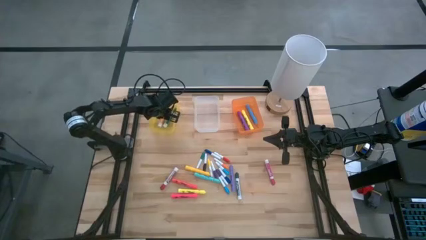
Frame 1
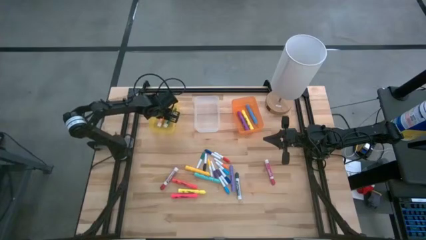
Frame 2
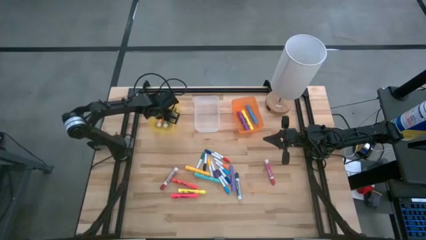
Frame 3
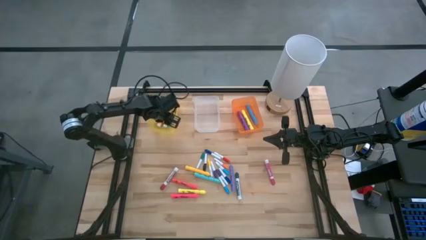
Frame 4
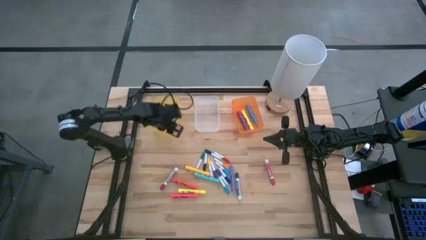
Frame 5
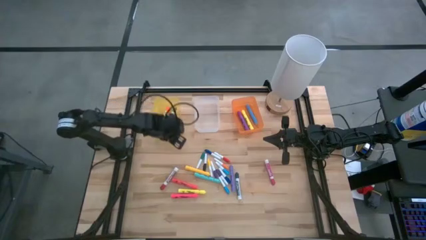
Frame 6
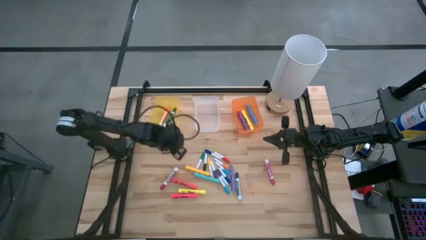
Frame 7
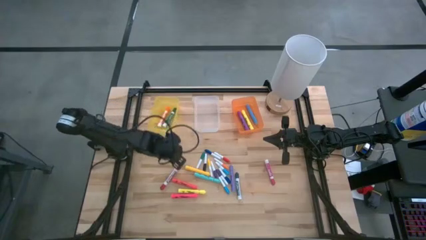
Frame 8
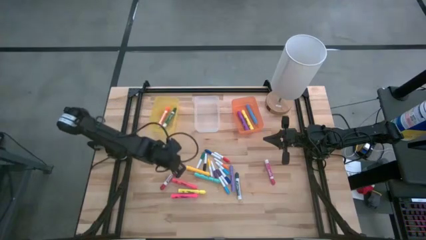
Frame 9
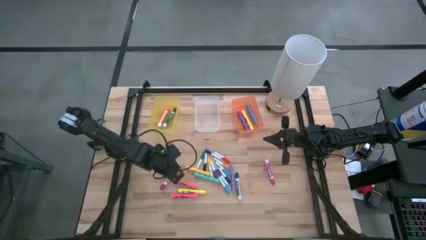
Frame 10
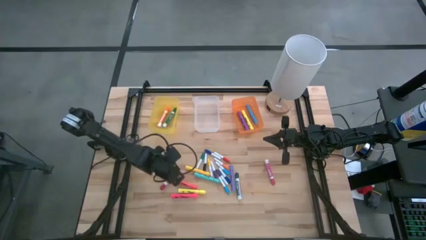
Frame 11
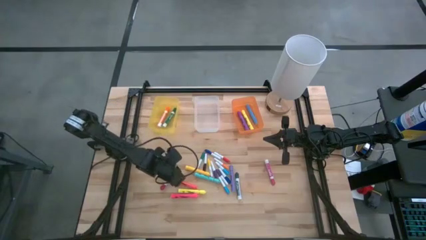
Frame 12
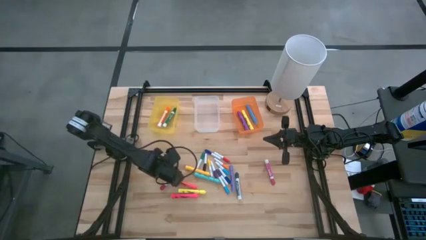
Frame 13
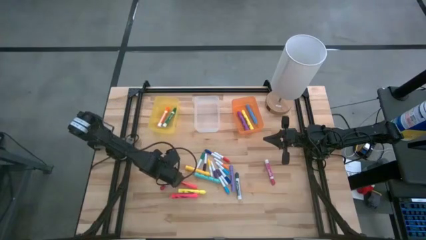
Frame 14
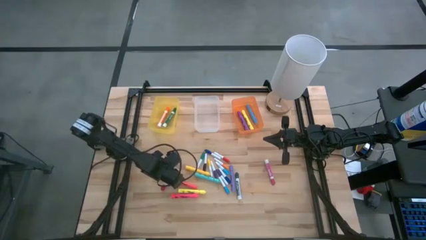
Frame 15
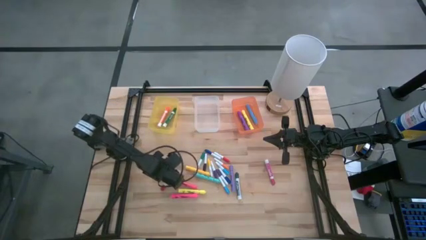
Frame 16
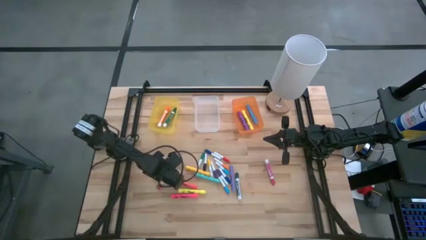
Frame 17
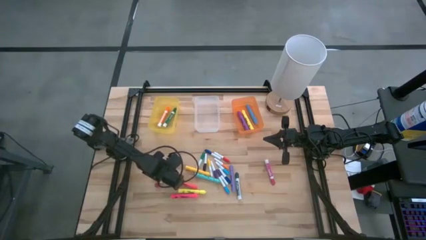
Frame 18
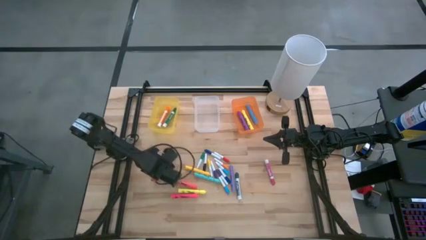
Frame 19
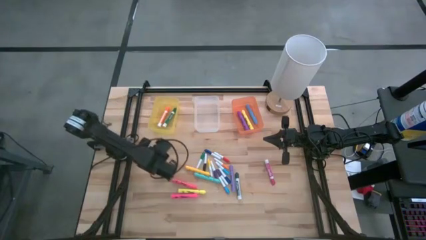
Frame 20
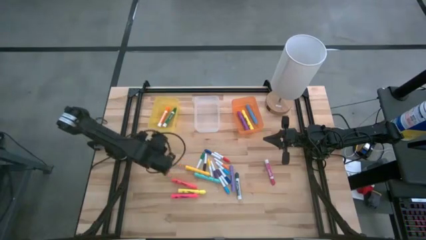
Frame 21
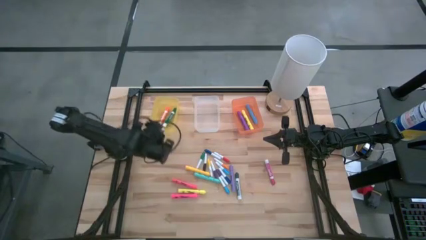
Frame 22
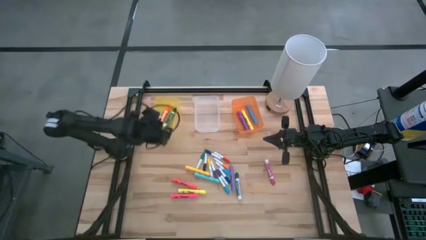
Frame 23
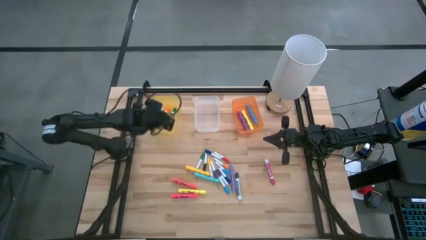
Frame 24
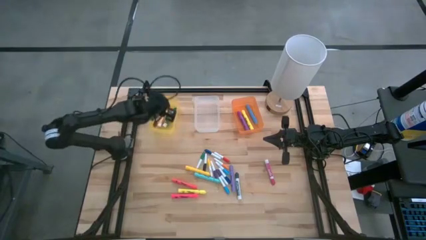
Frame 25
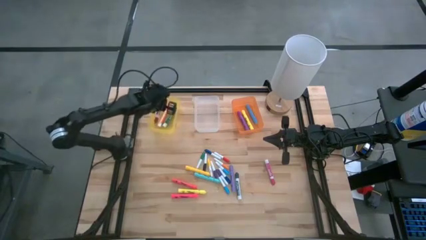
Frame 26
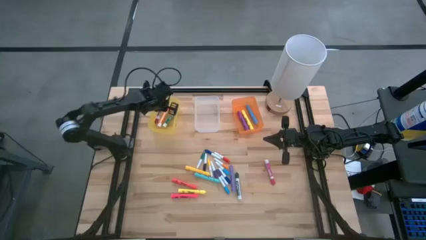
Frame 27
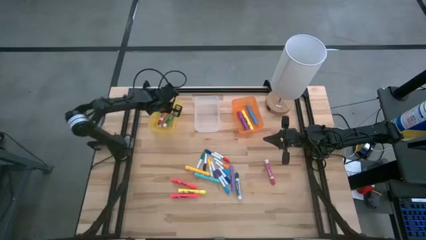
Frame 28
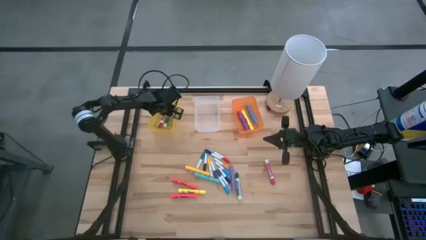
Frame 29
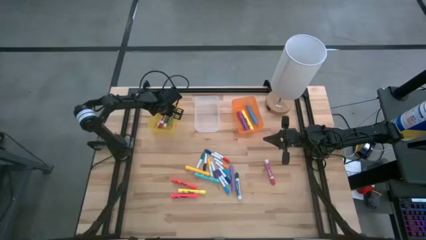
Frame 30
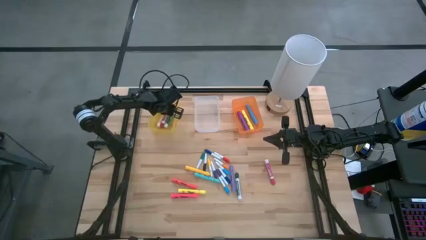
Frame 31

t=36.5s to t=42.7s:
Task: Pick & Place Markers
Put the red marker pen into the yellow bin

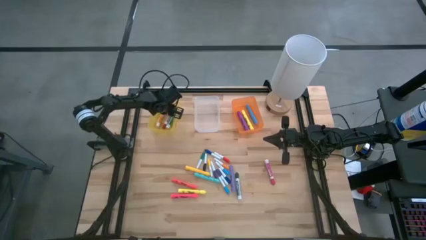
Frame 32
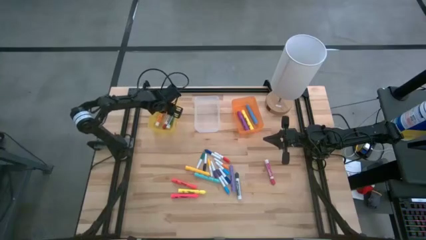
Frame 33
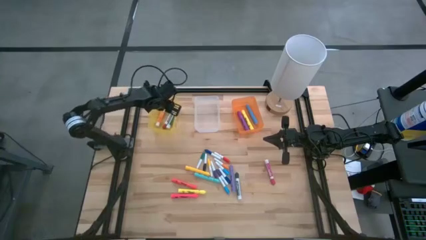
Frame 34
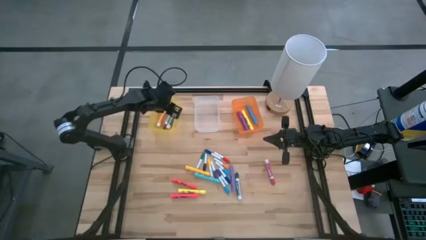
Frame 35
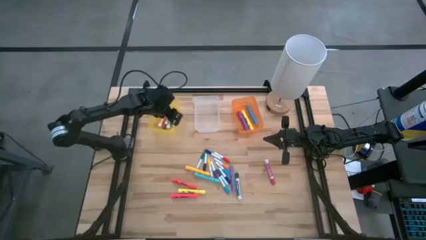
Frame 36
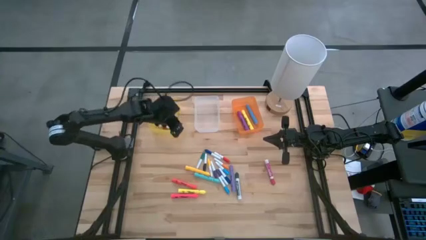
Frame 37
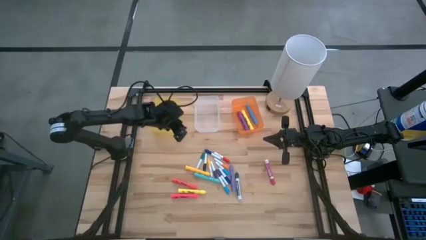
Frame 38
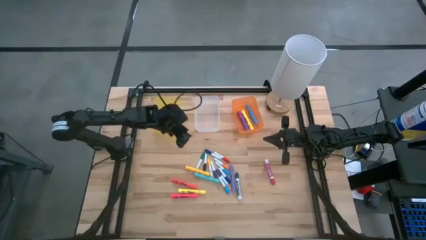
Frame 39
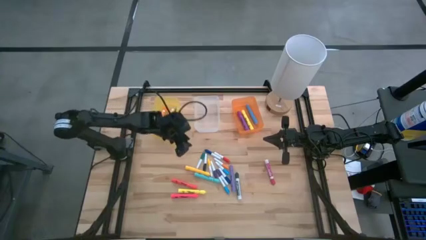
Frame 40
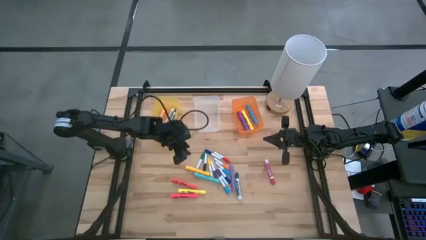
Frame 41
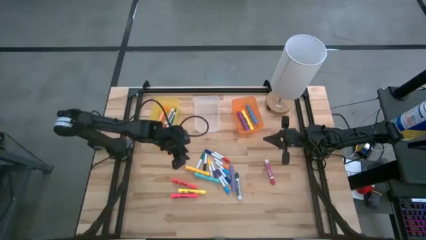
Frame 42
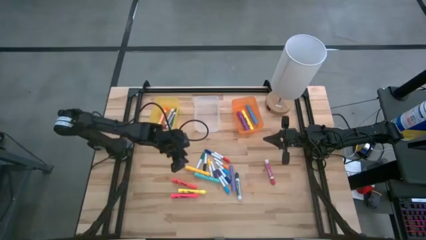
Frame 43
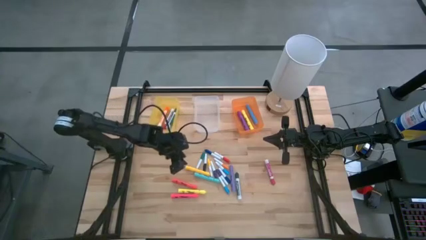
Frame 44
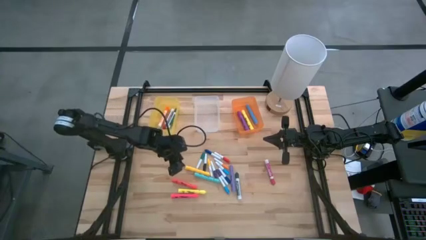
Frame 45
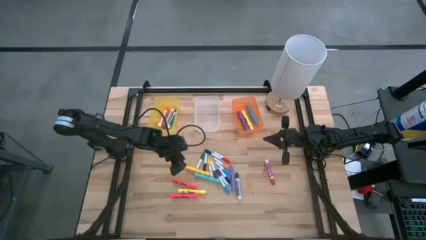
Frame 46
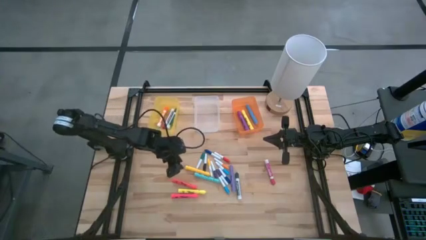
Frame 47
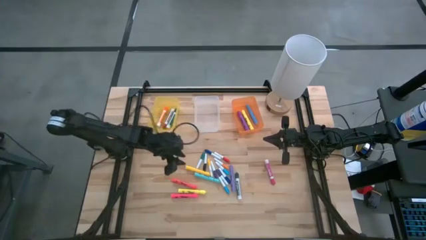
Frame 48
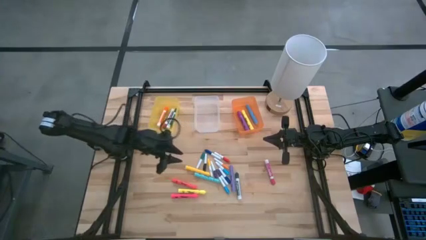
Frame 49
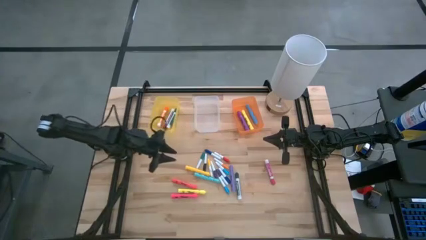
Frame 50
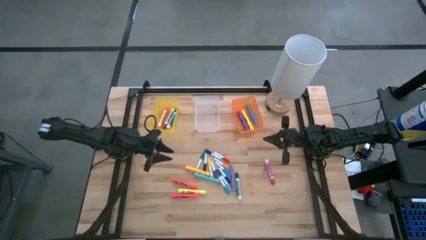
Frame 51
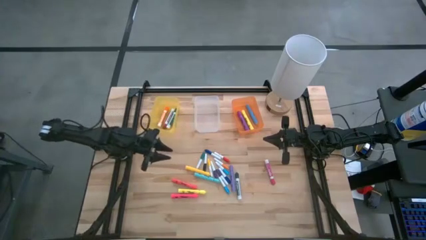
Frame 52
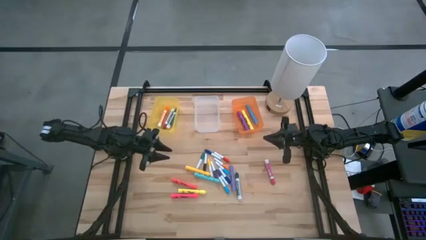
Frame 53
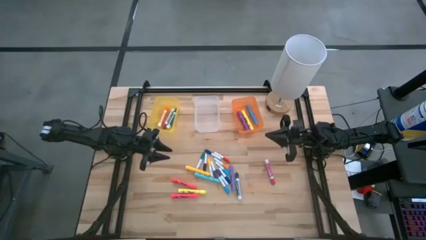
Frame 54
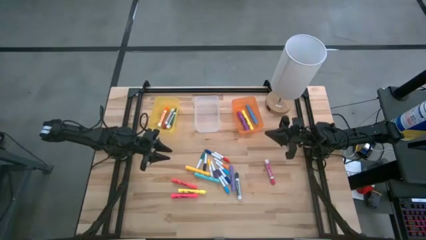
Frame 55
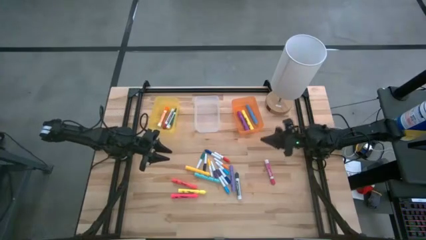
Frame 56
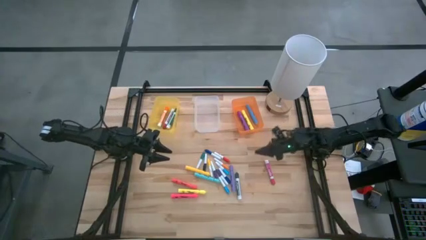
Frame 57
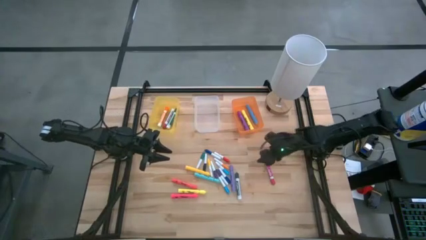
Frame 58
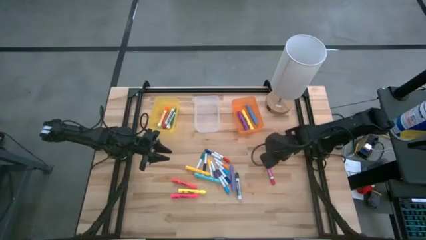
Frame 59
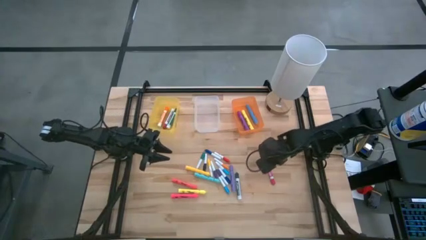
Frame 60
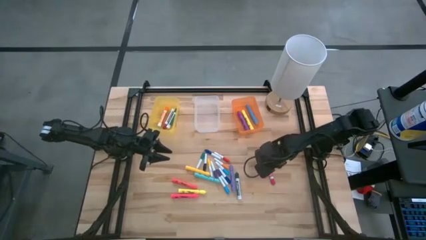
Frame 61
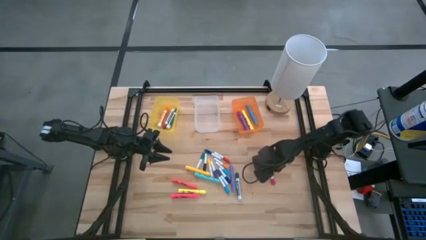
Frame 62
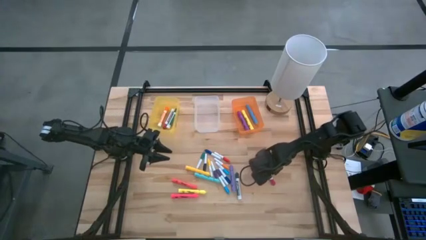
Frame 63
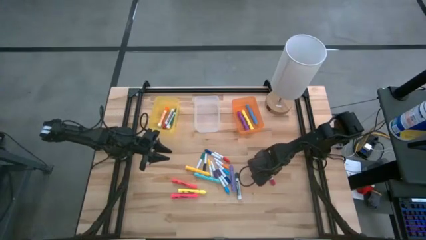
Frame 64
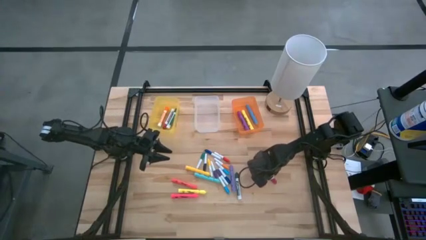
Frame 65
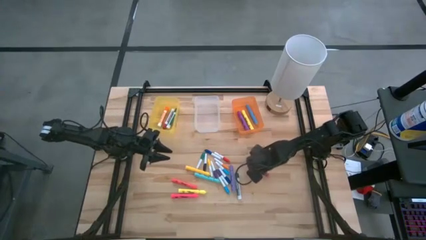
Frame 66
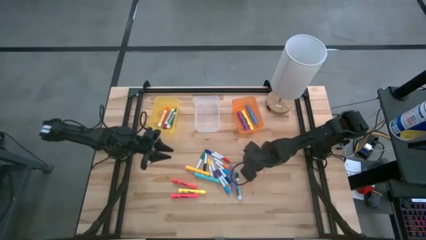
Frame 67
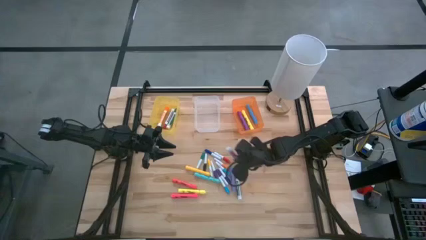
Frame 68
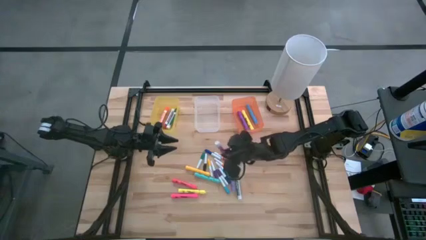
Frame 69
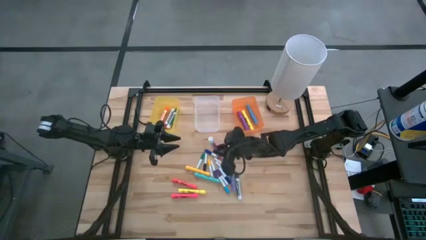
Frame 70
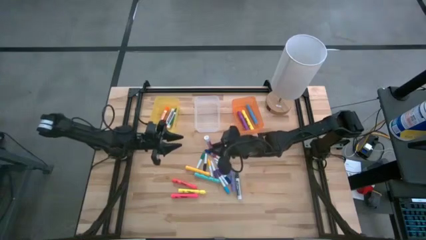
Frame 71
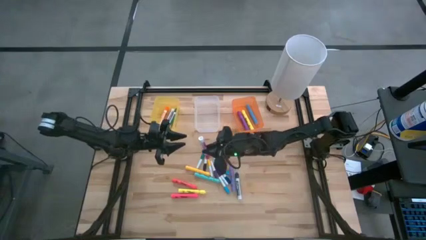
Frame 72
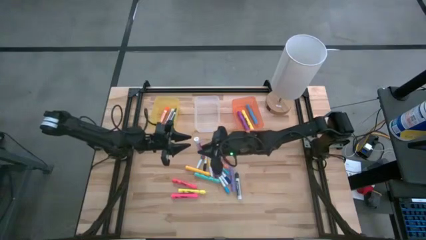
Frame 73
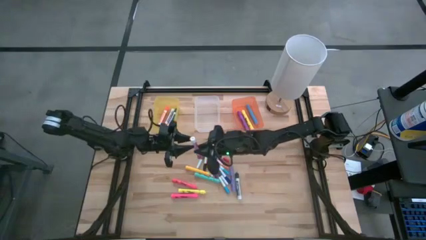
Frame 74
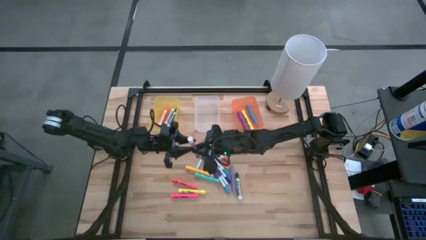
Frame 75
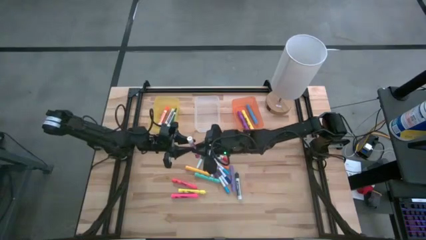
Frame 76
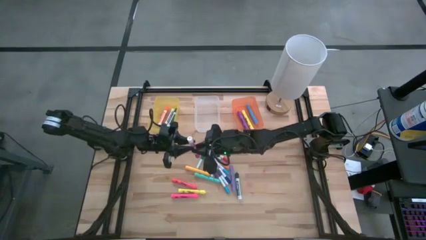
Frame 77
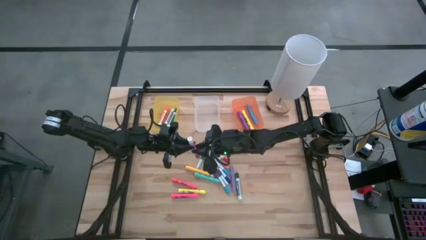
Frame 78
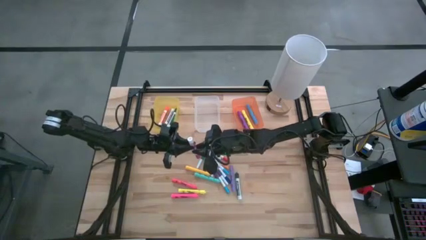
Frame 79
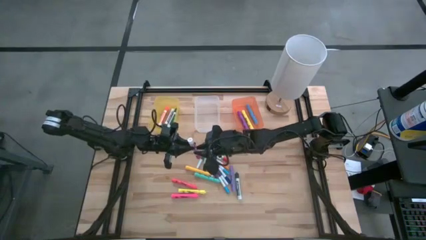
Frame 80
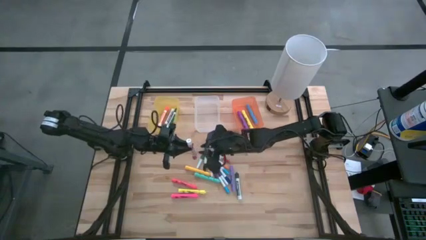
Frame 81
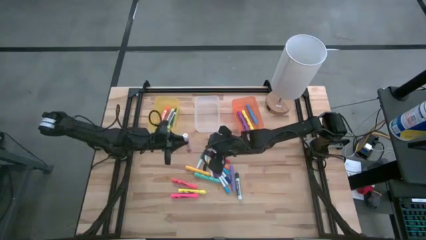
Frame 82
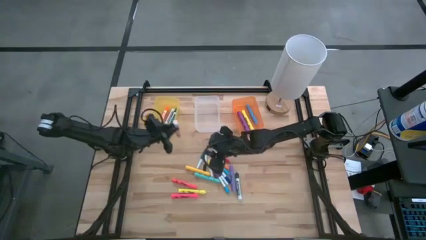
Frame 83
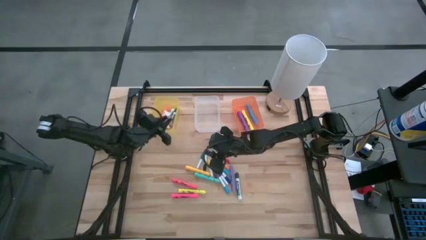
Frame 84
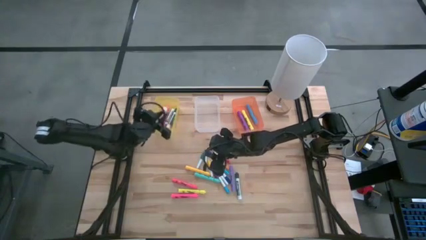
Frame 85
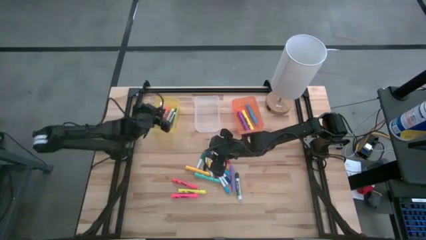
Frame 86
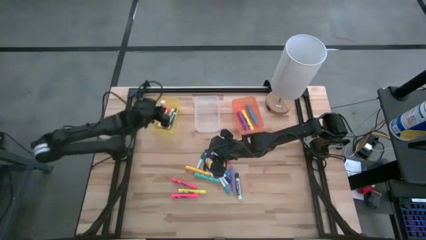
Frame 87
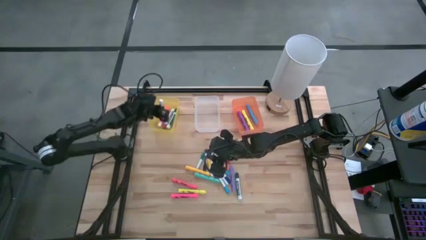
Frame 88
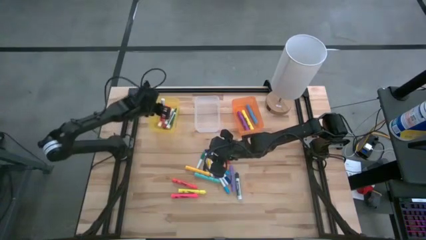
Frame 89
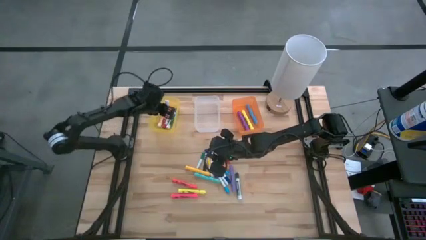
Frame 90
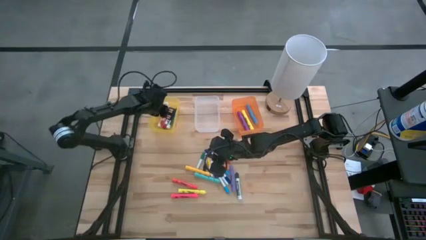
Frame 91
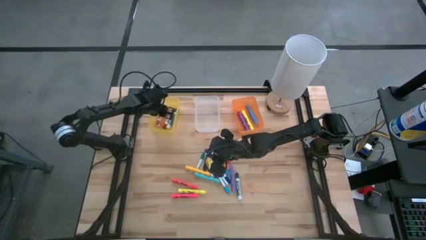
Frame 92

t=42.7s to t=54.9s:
Put the pink marker pen into the yellow bin
